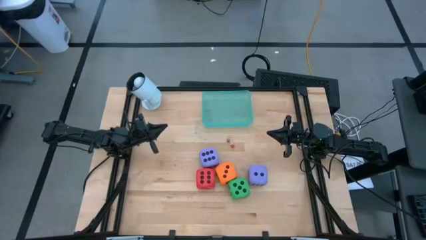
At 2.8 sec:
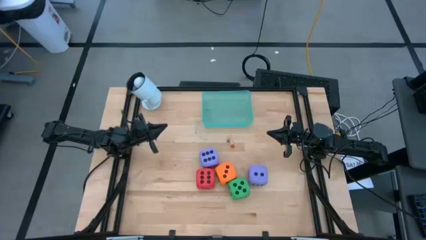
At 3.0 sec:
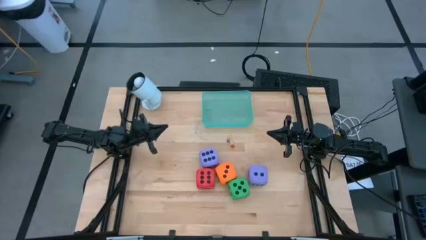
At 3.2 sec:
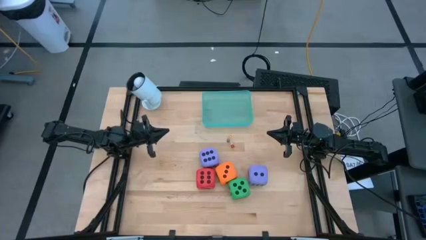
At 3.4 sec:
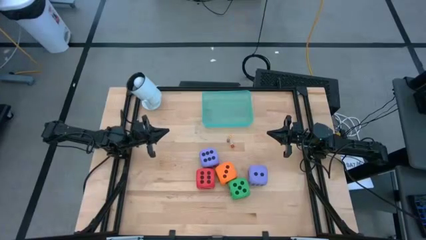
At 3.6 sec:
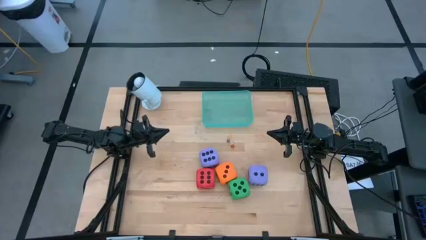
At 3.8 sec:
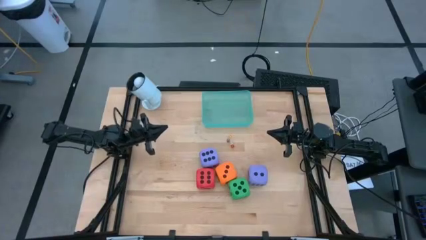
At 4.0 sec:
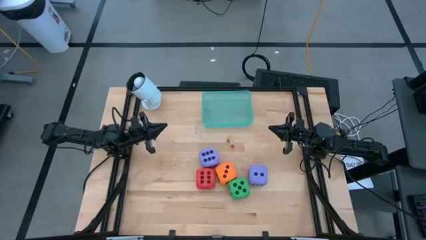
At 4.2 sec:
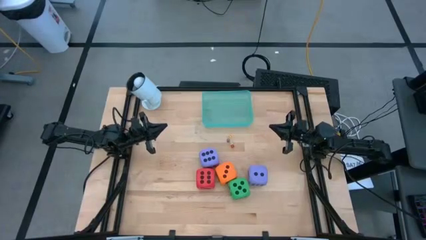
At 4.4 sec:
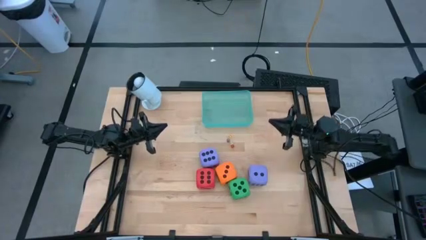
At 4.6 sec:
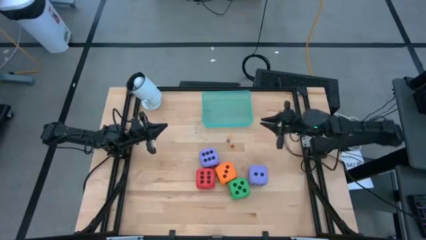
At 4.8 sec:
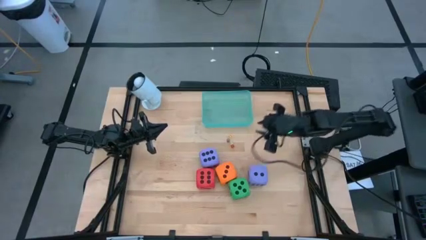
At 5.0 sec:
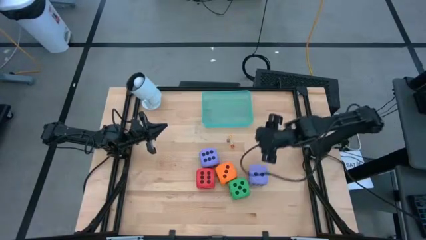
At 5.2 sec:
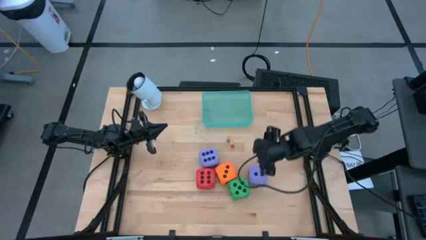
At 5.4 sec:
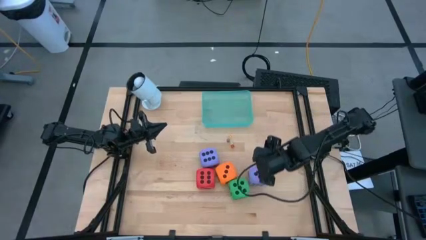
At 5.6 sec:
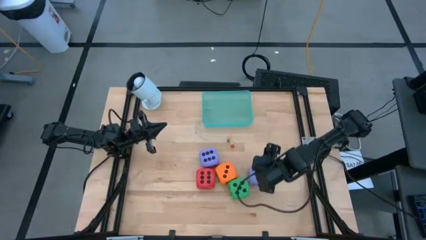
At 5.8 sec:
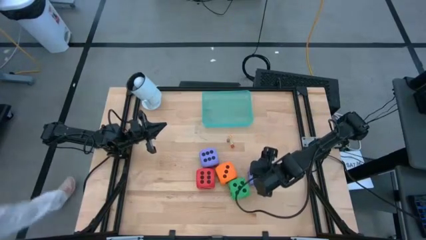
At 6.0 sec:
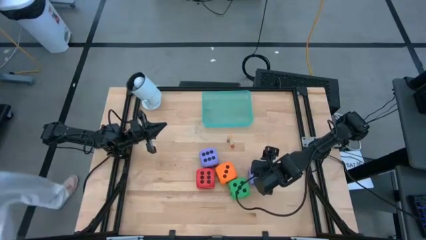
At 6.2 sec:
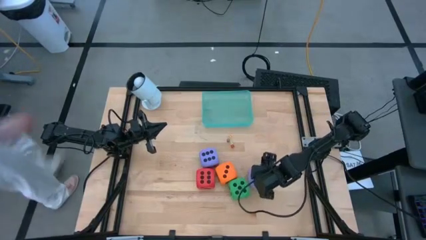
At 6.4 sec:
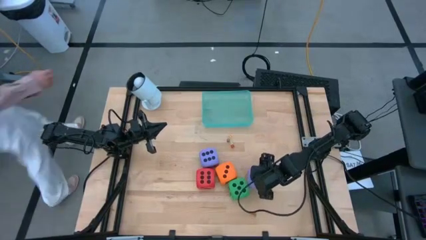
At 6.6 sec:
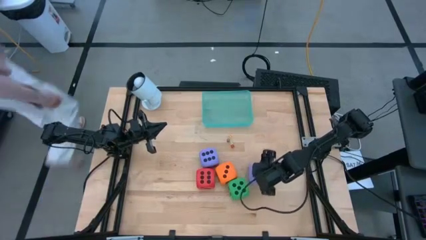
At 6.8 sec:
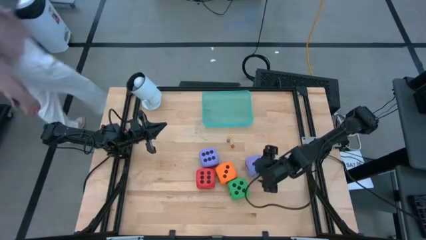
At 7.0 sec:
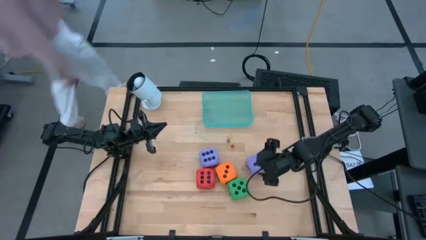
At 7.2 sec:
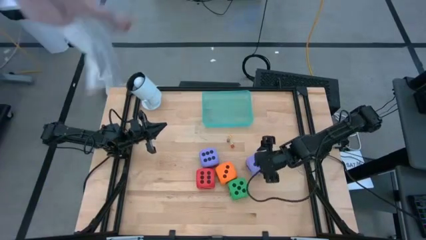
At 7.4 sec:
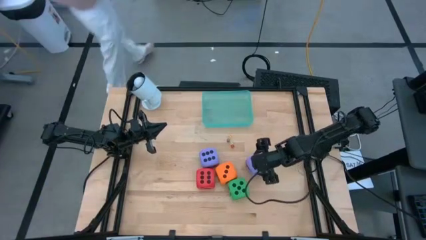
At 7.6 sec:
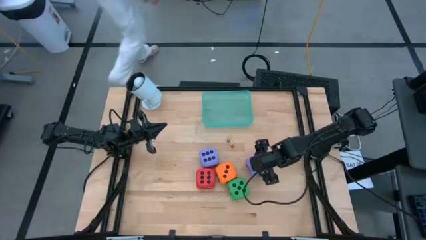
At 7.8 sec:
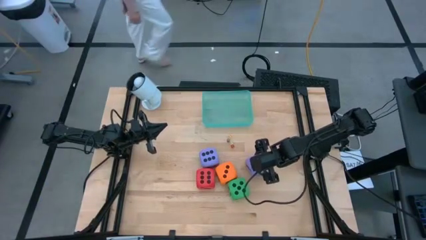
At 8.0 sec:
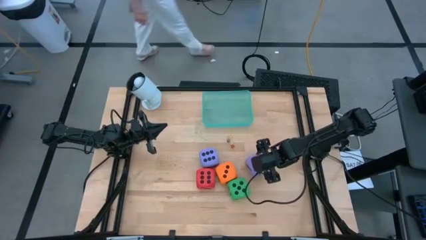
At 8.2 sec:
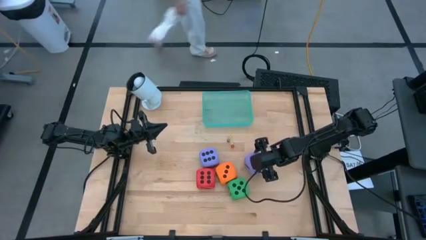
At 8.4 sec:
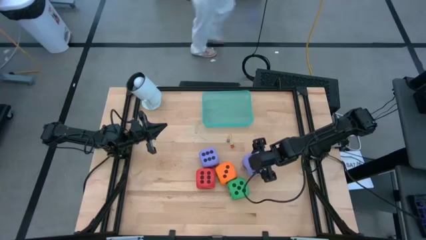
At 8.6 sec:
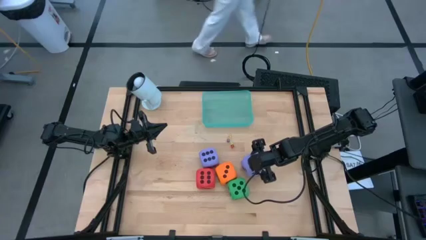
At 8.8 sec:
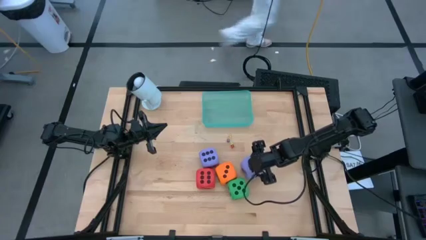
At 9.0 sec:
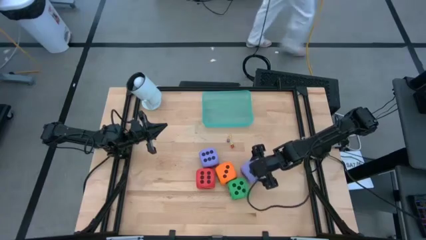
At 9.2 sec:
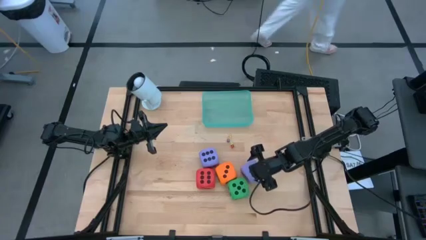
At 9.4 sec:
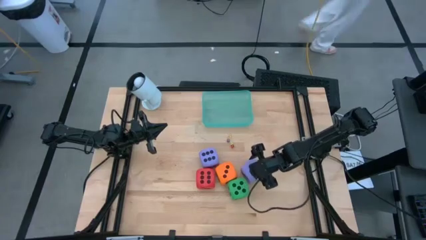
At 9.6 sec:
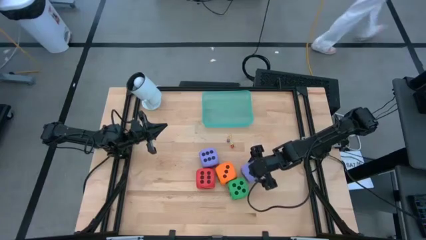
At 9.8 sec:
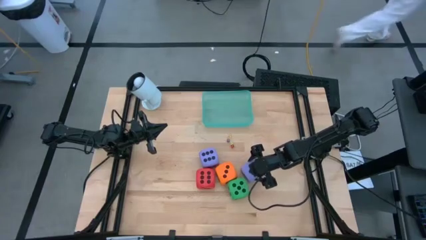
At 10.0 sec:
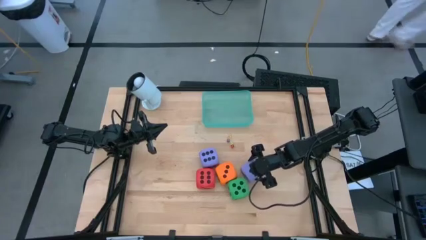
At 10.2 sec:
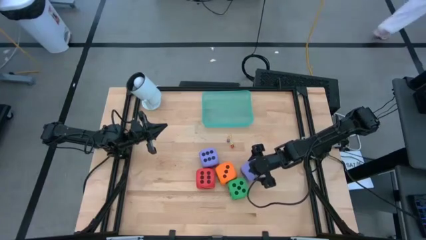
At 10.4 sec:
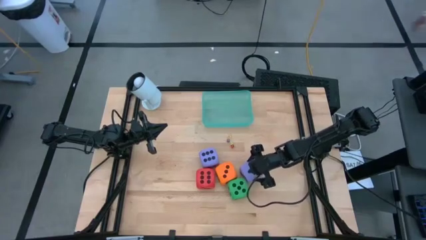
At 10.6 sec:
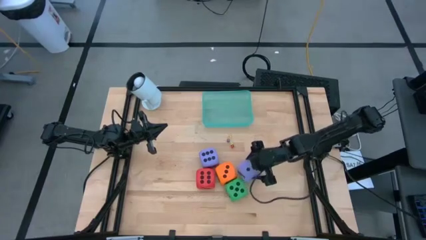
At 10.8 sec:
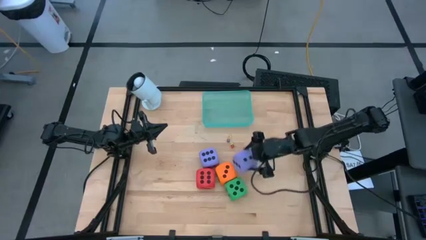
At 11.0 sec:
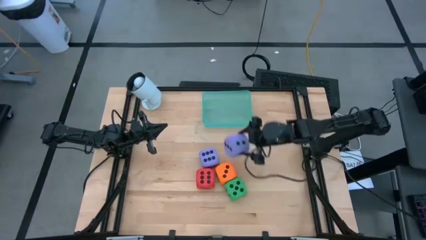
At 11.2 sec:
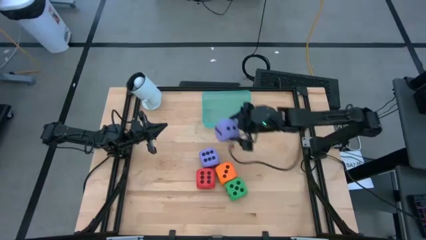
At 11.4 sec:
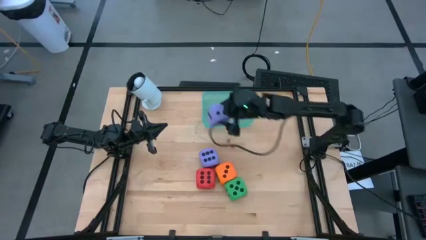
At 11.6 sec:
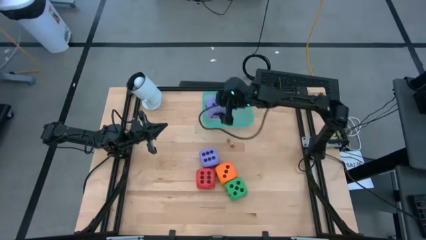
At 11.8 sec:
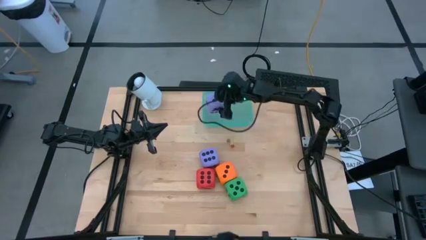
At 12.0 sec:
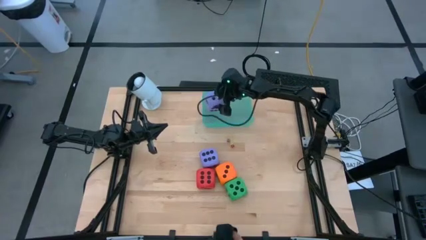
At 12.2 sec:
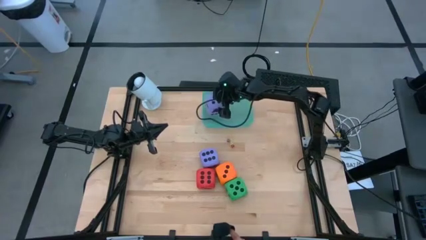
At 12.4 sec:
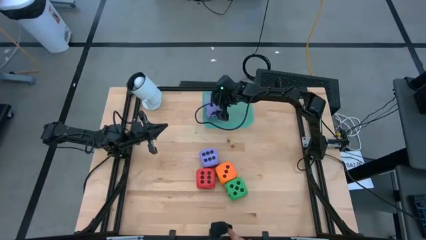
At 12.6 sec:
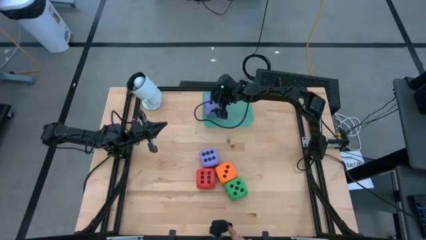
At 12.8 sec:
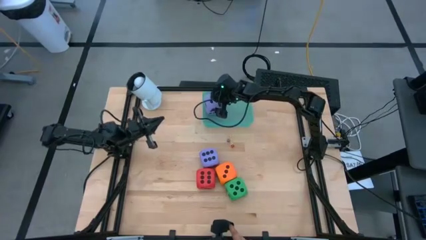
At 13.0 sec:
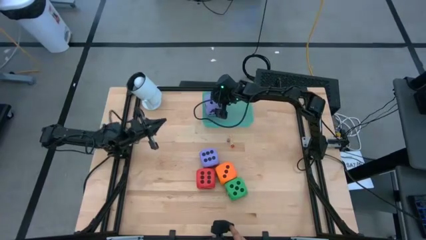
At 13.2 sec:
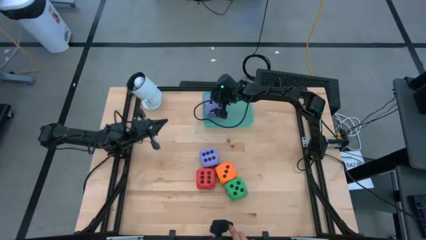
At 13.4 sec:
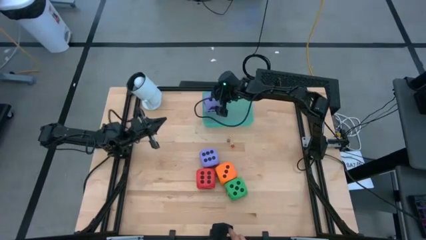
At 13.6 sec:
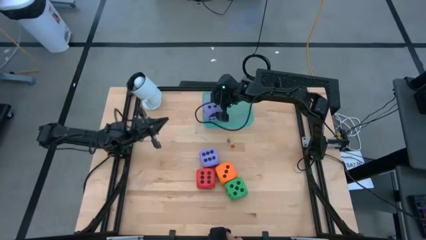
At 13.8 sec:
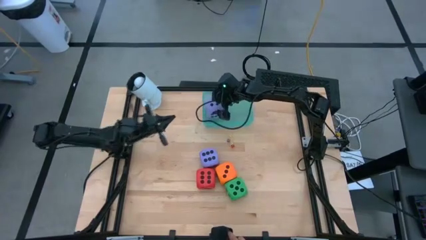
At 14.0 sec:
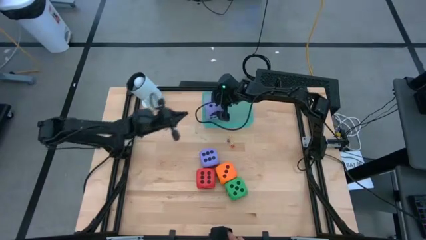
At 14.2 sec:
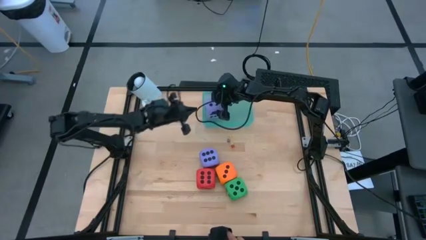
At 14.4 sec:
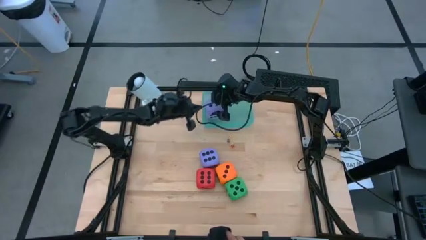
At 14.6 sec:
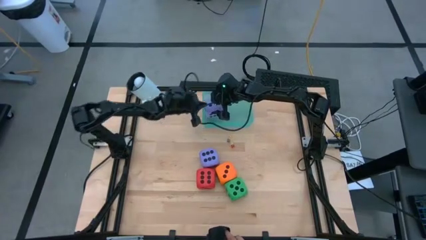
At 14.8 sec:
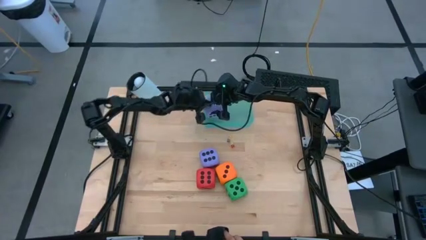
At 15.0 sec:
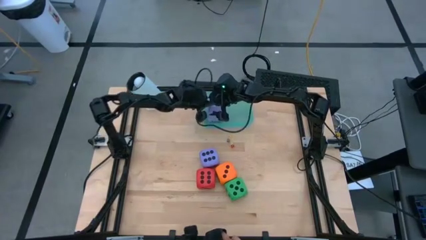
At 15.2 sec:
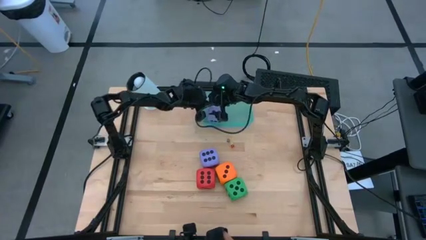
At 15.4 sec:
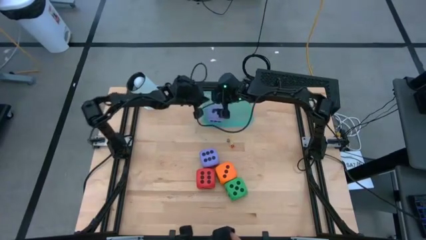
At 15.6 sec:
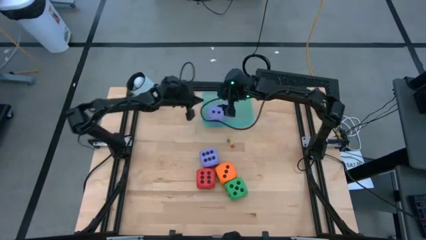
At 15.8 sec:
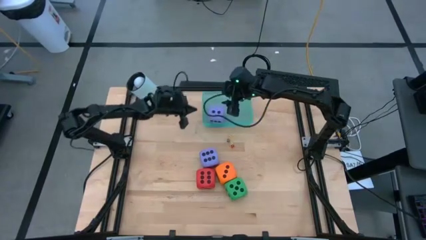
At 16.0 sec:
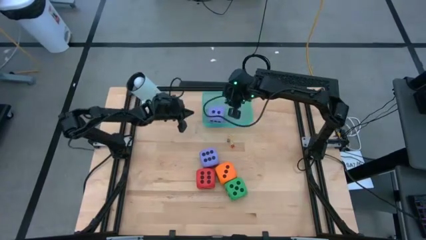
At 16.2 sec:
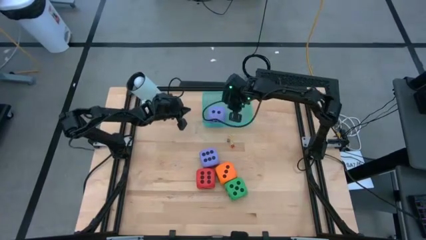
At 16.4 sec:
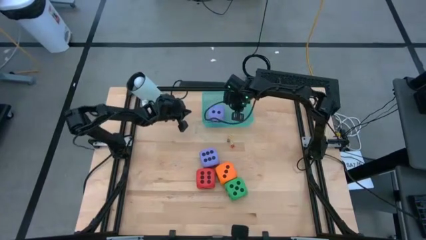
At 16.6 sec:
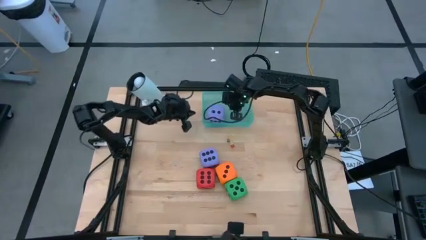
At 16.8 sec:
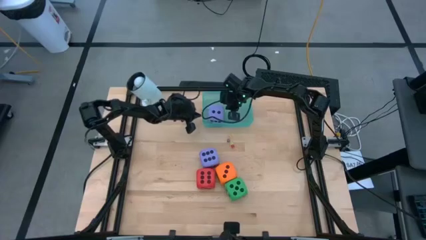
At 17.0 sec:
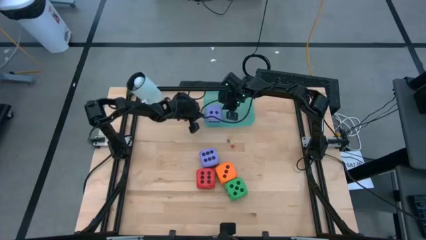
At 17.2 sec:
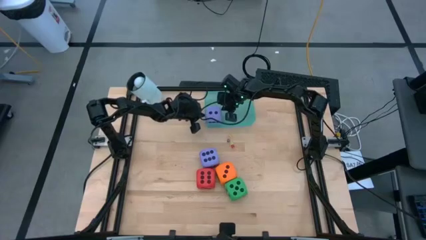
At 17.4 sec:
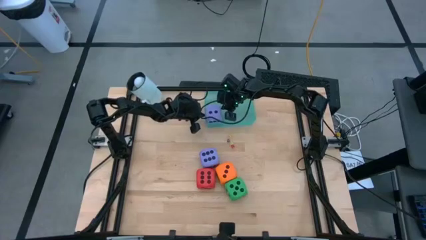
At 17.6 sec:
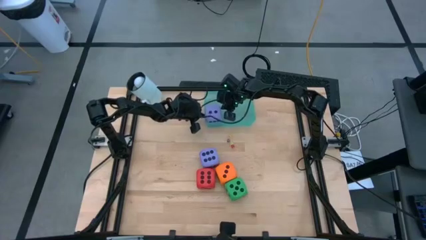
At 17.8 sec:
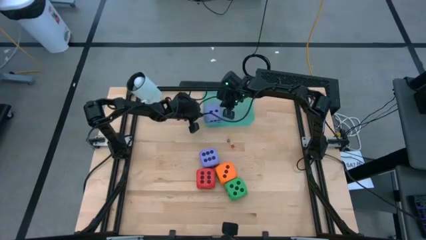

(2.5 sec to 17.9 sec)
Task: Pick & Place Dice
Put the bottom large purple dice into the green container
